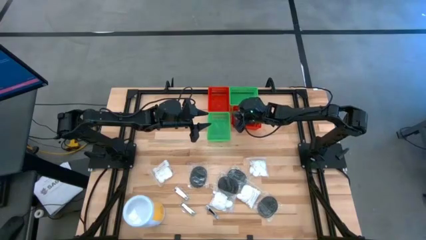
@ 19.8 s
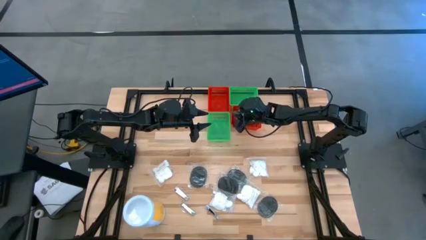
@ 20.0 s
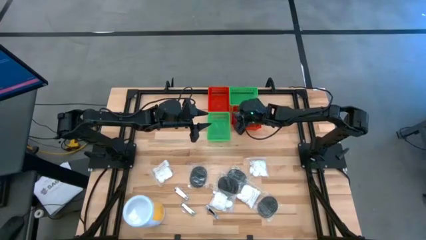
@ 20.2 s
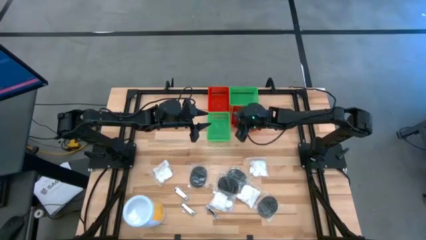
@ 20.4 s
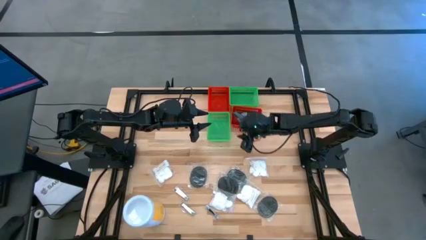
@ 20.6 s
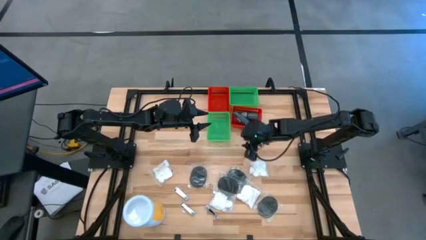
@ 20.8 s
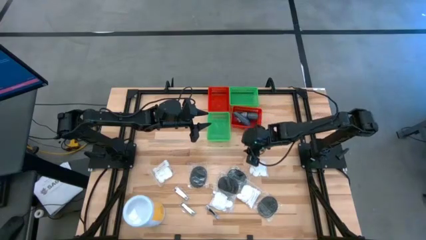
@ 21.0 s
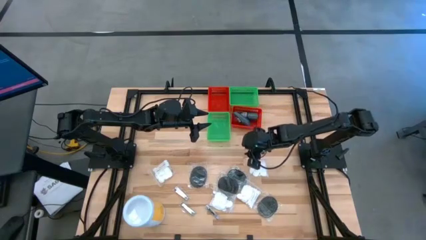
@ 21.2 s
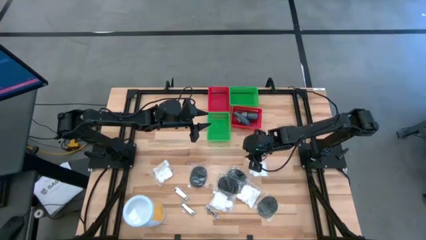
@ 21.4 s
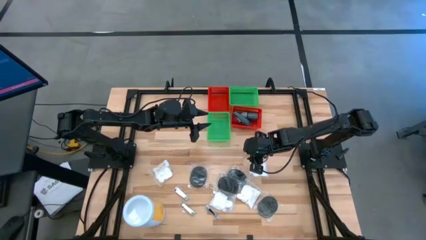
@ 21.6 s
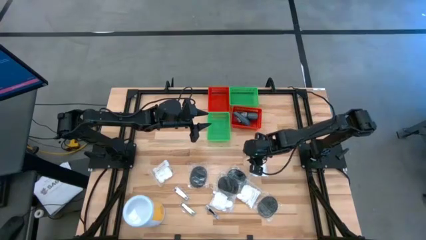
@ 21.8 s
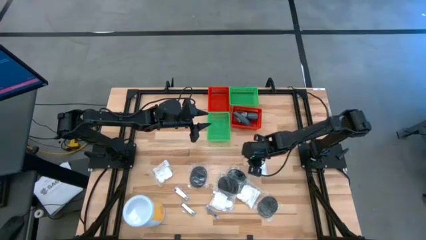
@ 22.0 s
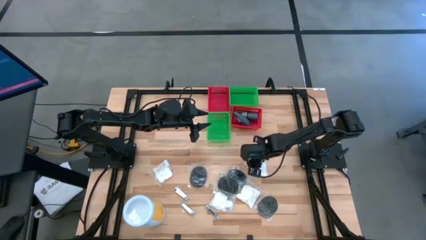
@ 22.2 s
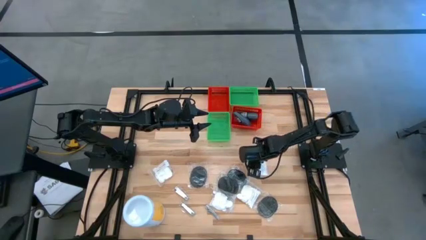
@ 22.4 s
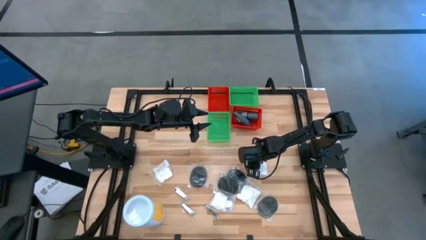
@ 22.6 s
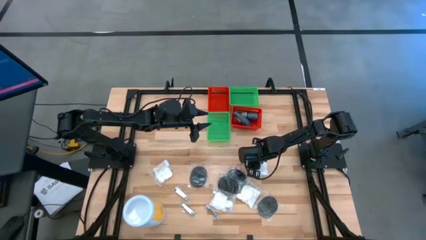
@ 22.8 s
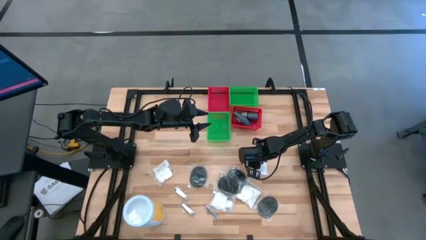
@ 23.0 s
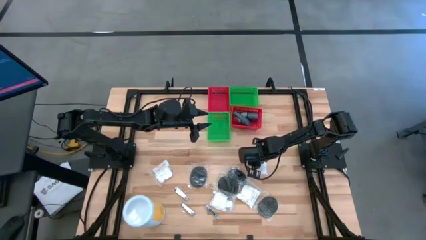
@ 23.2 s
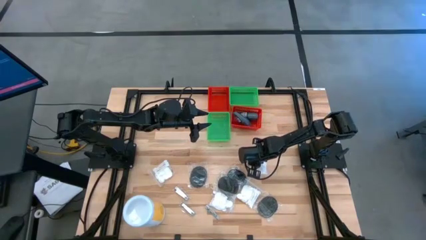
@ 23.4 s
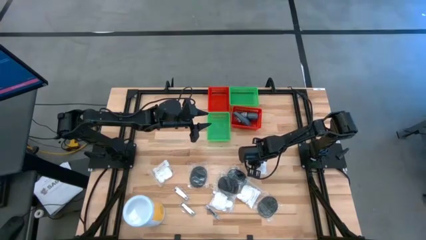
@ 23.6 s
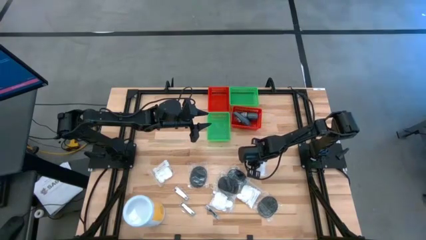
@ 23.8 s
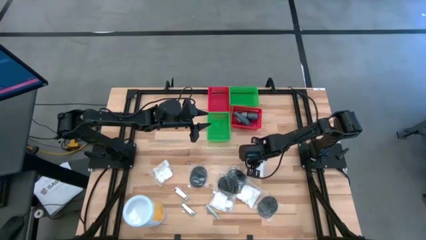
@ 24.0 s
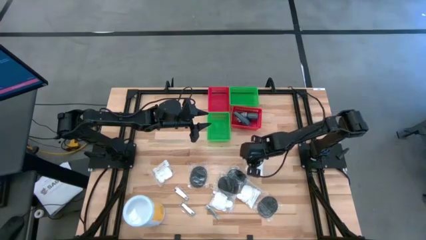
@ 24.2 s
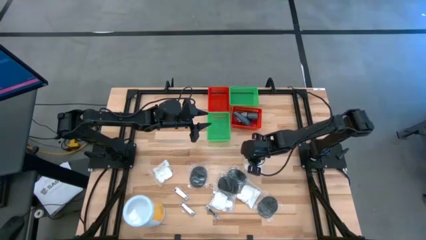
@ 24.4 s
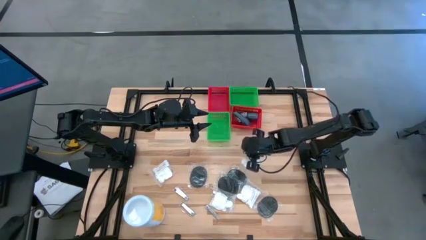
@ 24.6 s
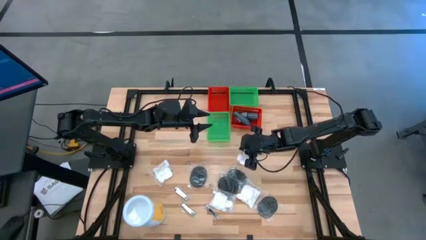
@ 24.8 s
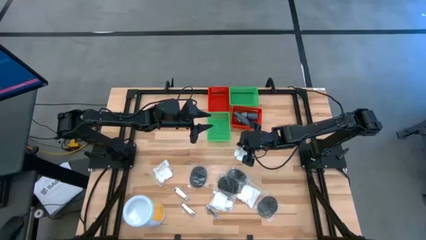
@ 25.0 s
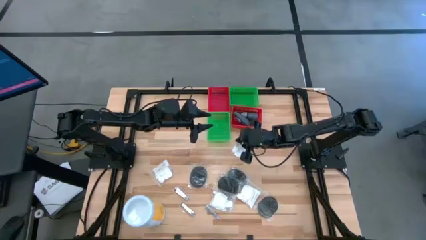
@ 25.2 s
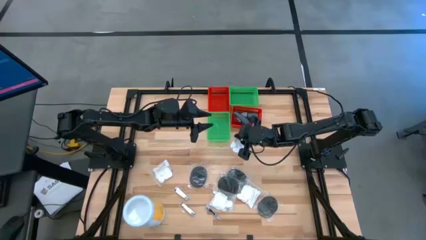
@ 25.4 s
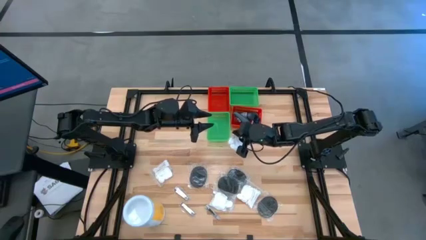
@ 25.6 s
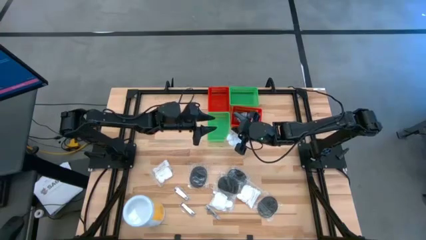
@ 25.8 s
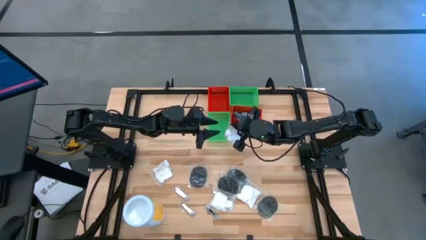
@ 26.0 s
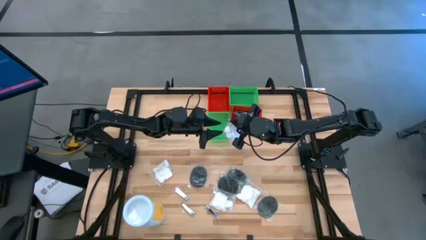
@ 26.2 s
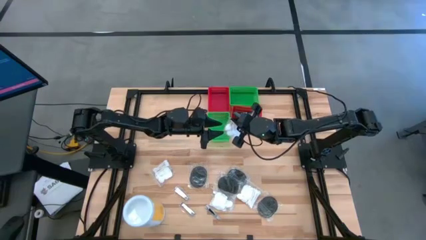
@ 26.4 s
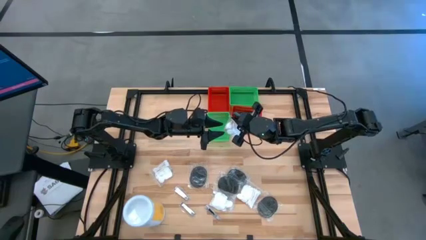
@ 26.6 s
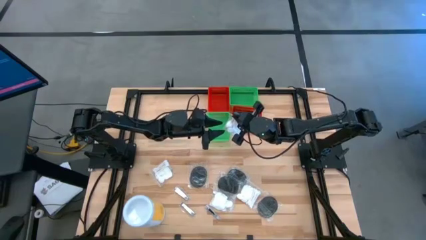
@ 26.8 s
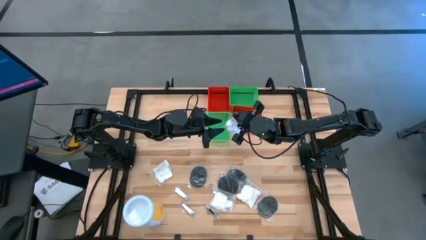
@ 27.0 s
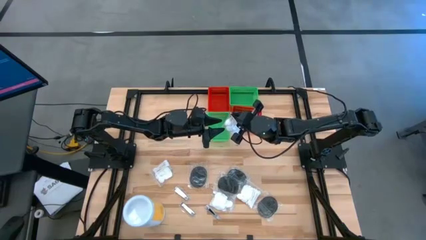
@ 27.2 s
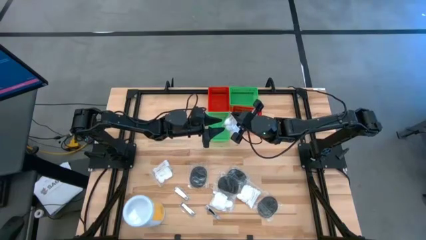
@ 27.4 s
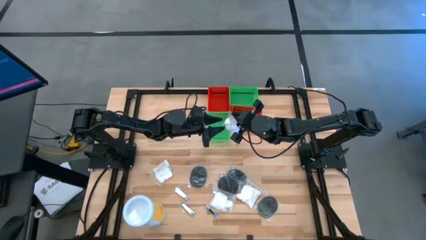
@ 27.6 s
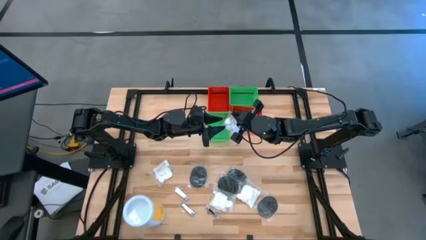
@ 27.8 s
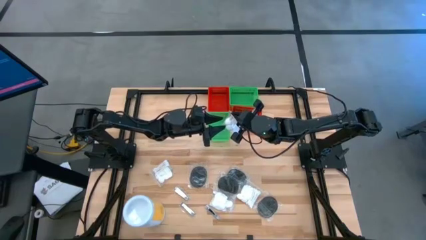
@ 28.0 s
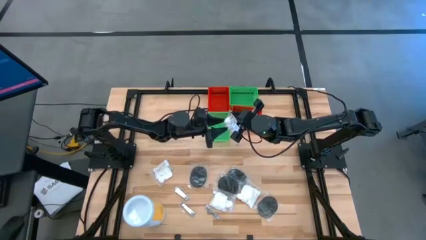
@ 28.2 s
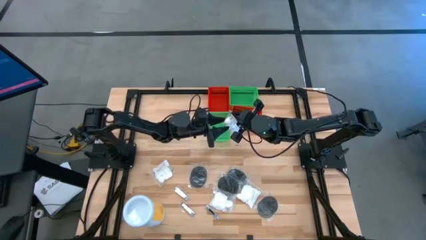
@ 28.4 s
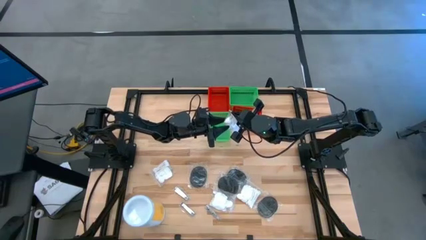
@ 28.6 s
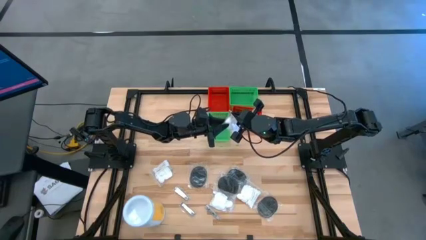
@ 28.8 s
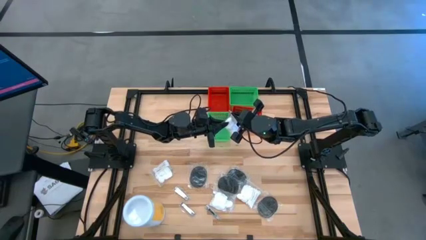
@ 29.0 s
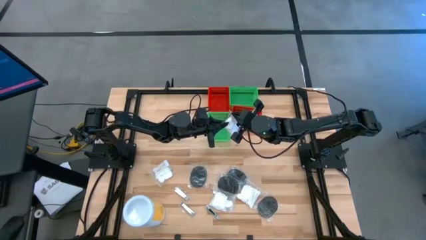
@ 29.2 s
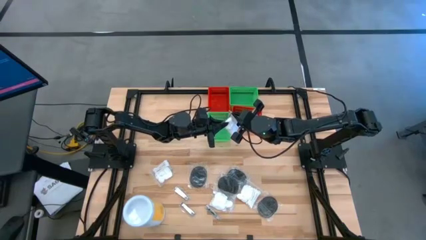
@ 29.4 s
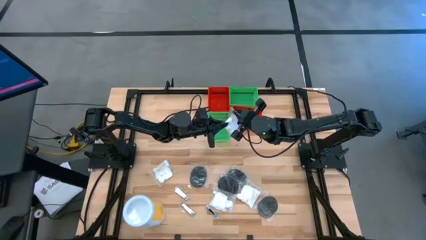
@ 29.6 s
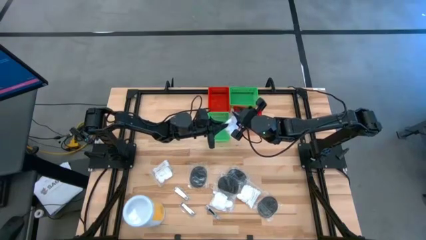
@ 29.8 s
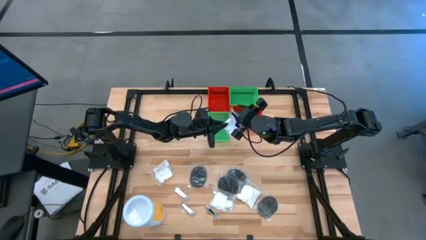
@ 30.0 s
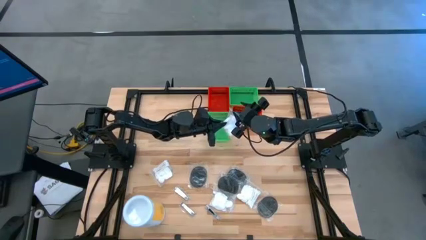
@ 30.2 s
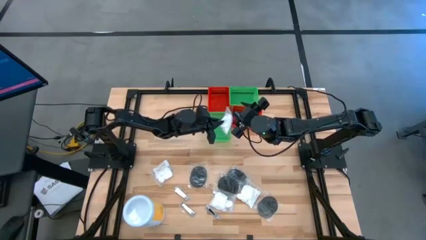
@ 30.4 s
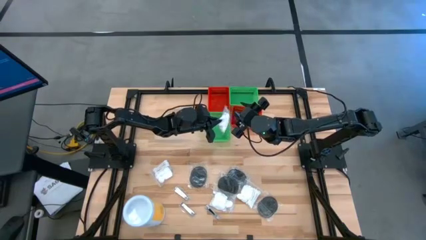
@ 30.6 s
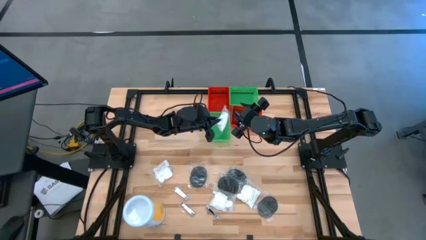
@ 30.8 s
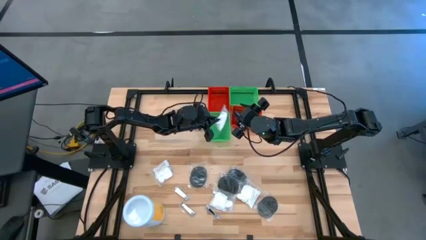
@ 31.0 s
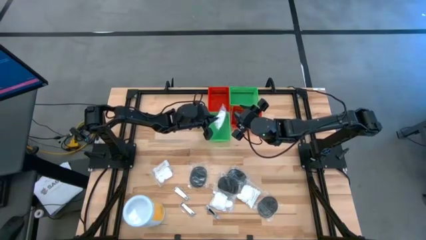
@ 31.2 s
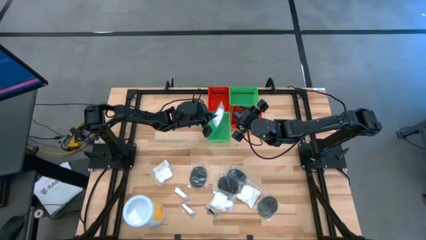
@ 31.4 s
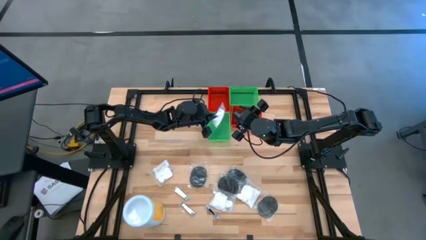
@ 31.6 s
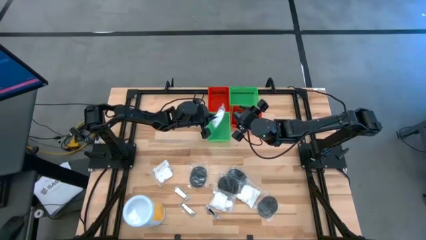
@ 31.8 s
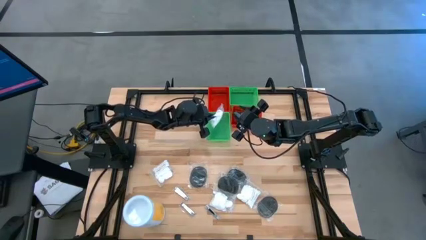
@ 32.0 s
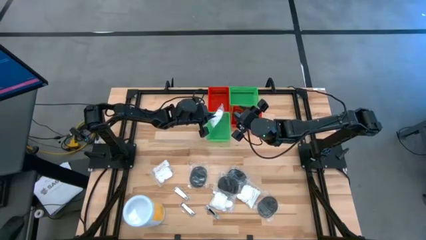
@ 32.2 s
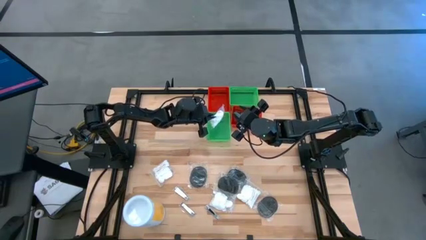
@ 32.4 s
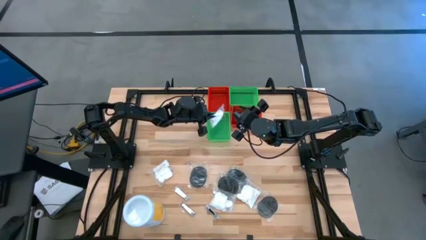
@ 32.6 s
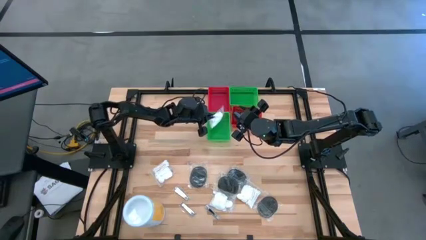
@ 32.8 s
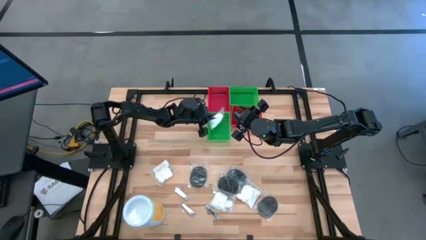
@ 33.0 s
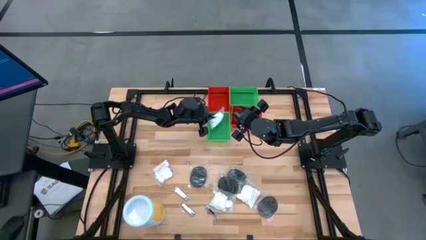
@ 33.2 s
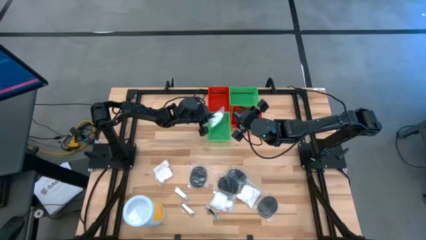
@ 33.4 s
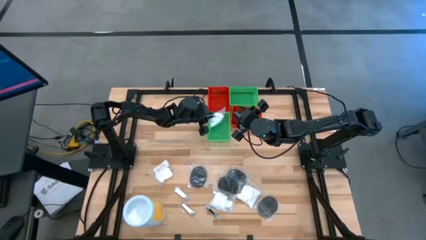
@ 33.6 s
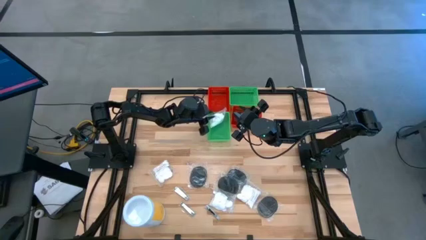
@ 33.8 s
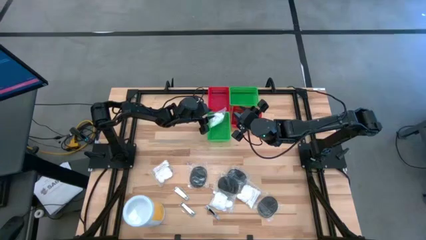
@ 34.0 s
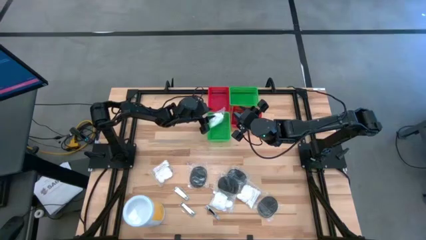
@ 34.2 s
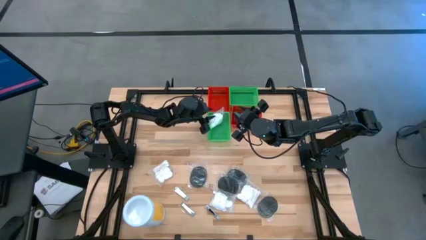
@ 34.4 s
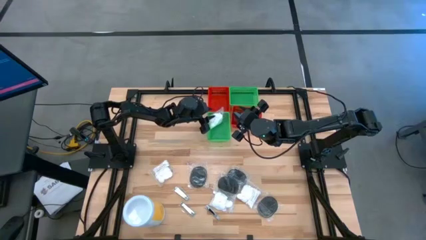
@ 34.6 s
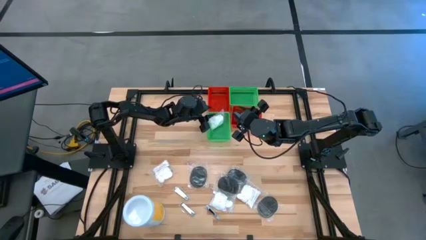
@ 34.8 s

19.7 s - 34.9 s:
Task: Pick & Place Travel size toiletries
Put the white cotton pack into the left green bin
